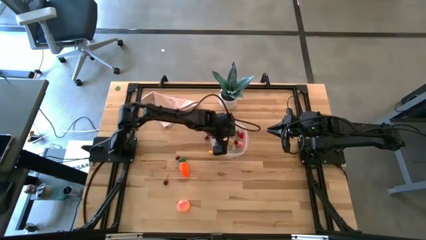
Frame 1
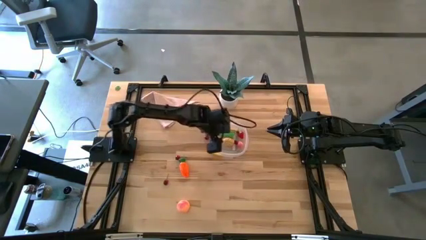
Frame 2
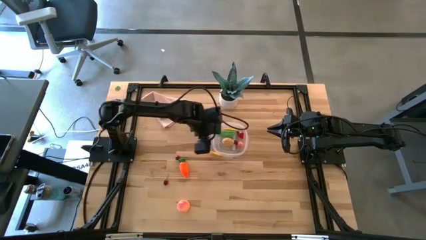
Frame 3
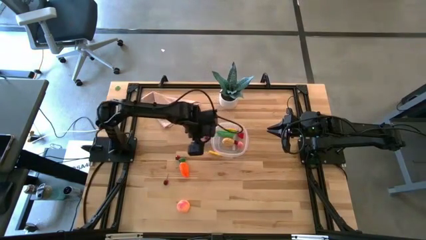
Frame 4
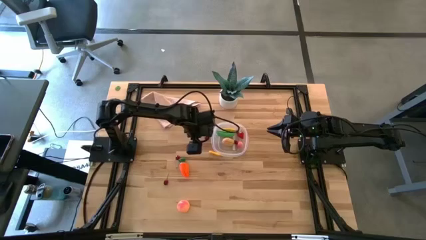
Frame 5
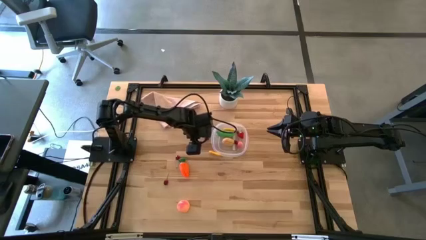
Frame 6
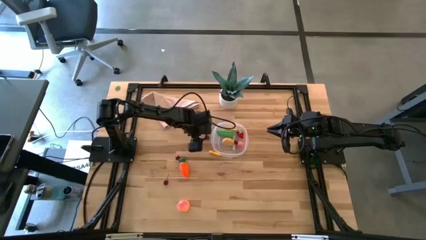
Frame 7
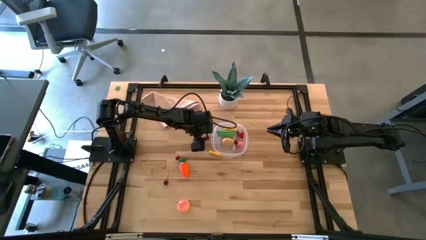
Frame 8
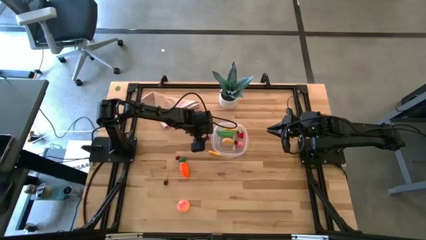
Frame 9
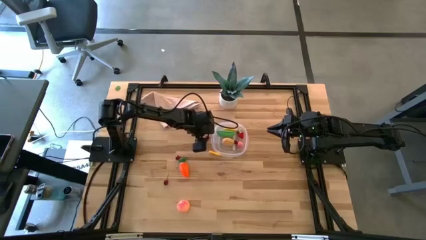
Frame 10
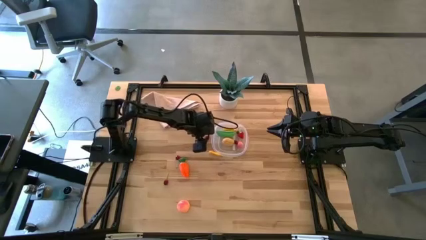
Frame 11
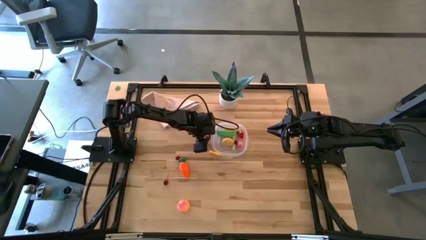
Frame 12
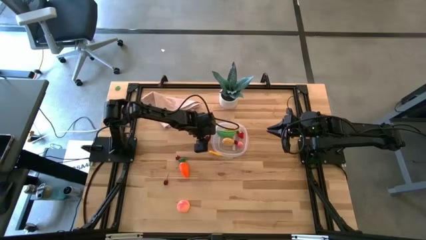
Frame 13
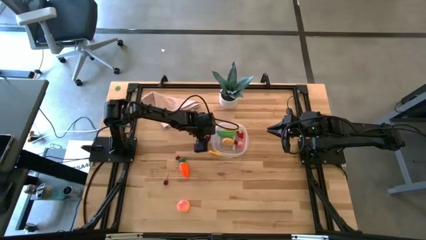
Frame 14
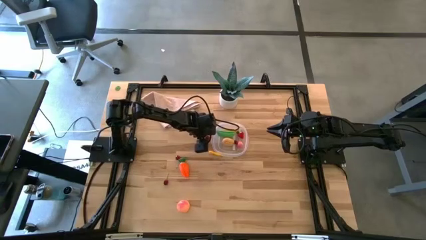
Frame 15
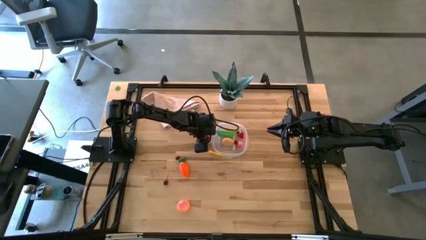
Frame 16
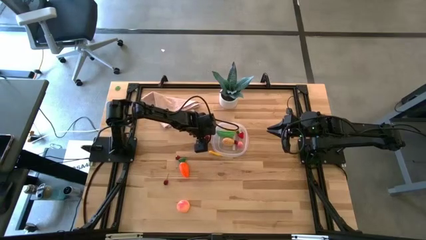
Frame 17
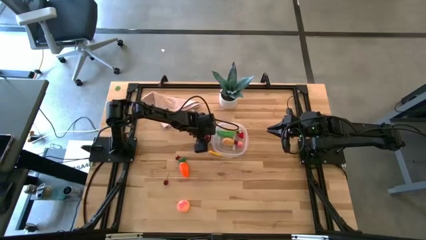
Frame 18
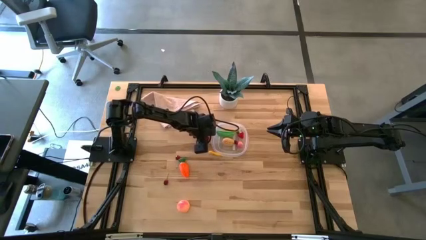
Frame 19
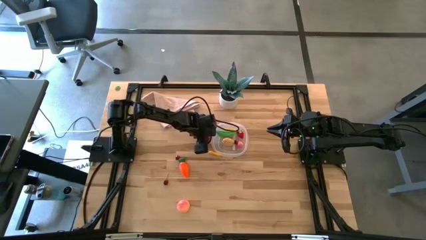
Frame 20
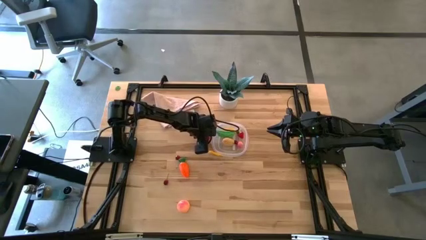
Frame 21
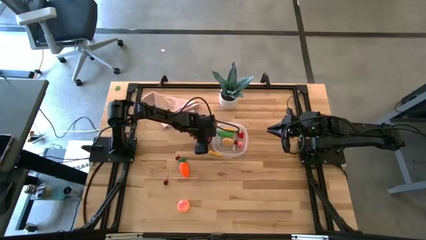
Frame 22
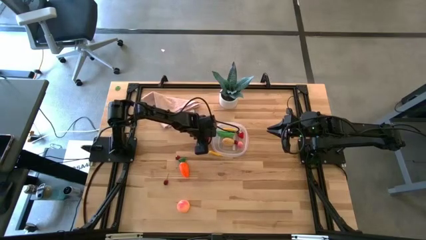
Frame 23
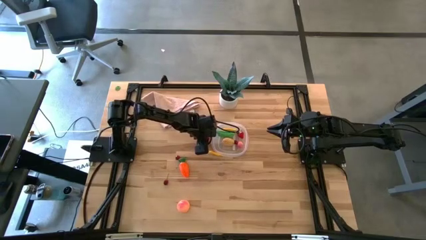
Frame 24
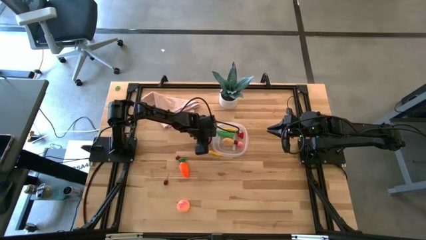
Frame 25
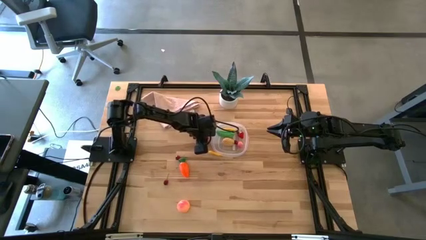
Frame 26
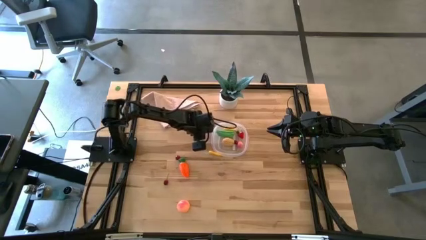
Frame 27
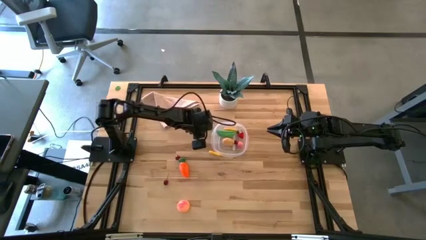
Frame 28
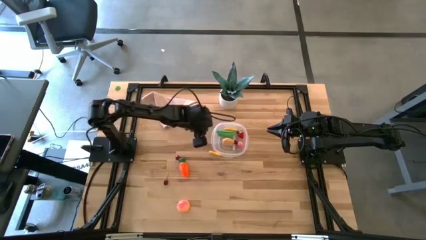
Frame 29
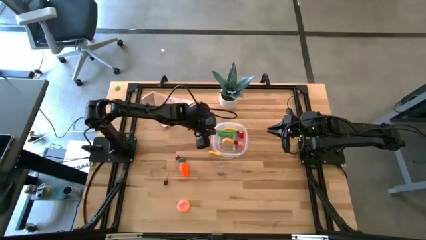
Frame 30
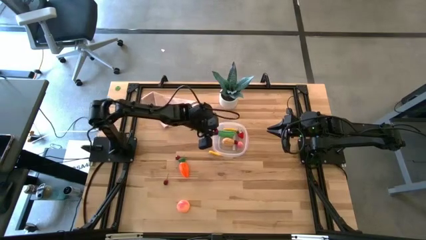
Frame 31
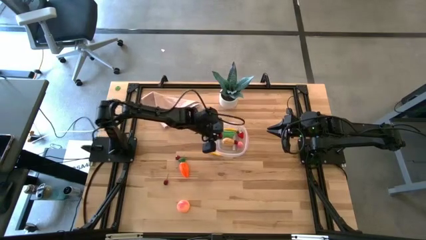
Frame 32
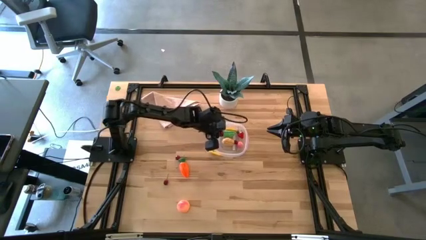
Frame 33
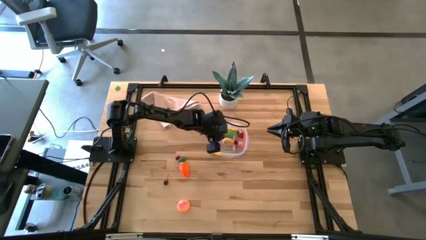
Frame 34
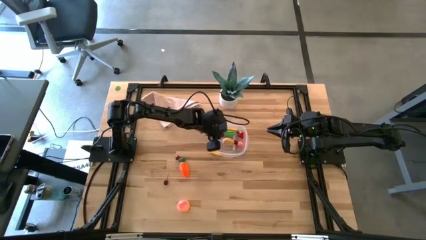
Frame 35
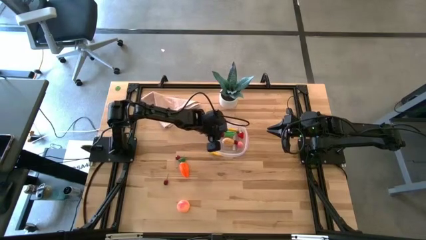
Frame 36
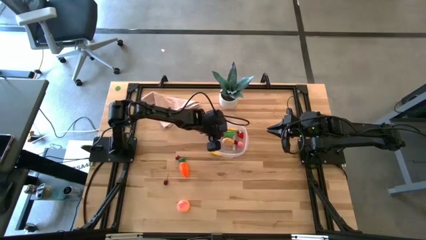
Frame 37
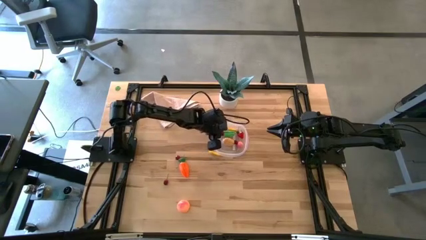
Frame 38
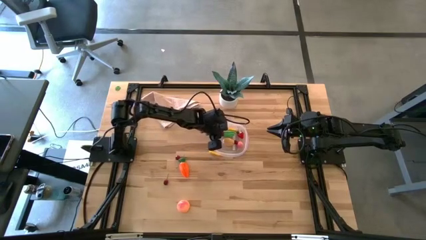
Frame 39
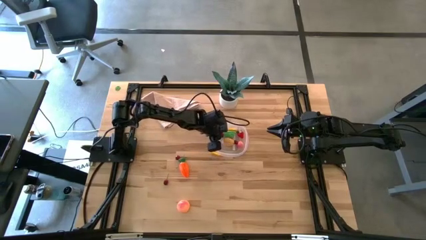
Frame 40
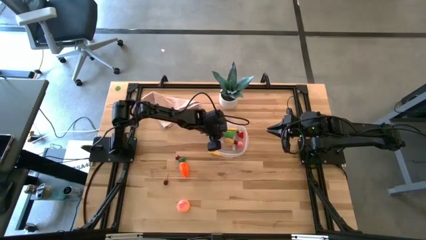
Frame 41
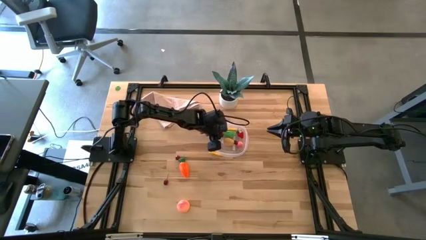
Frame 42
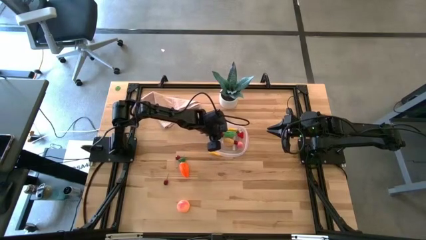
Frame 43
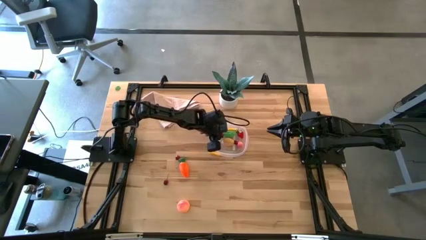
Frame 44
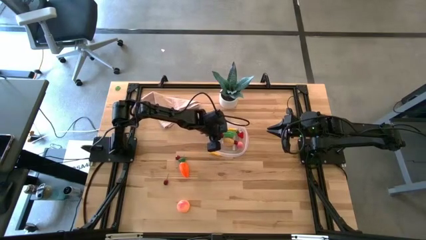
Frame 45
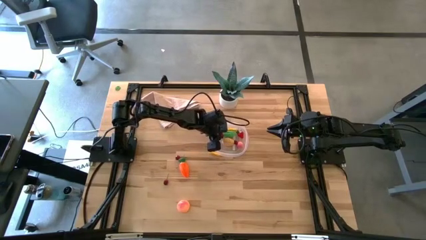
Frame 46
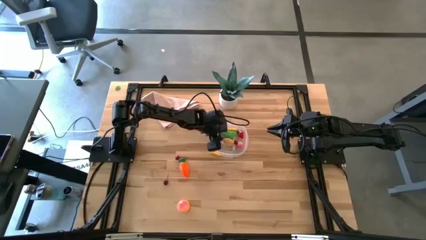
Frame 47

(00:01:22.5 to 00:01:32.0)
Task: Pick and placing Produce into tupperware
Put the top cherry into the transparent bin

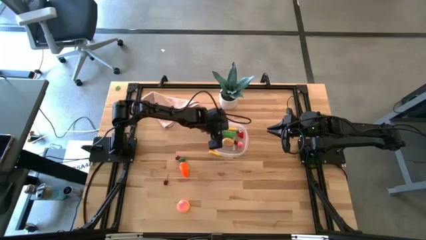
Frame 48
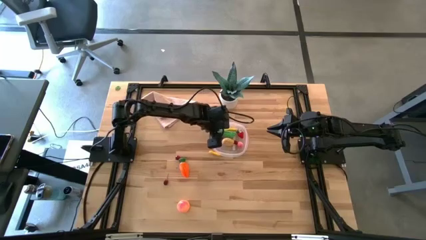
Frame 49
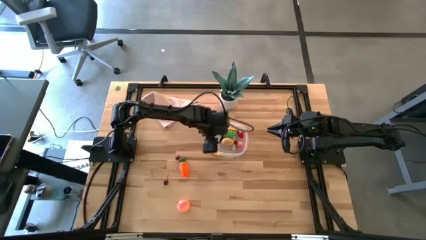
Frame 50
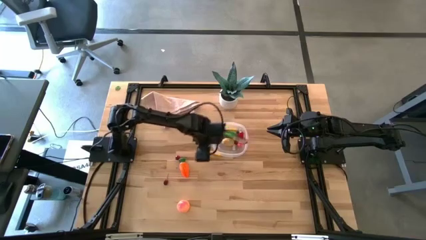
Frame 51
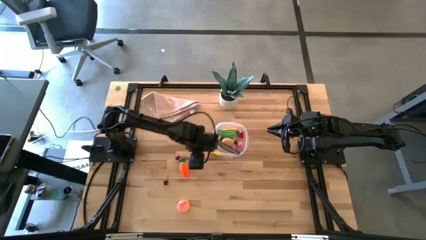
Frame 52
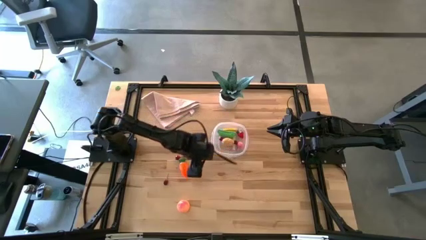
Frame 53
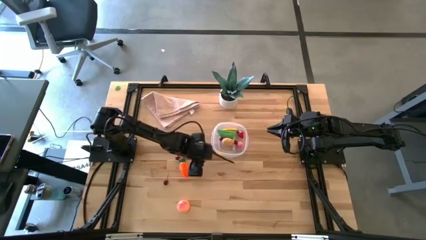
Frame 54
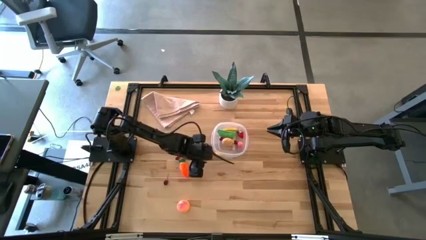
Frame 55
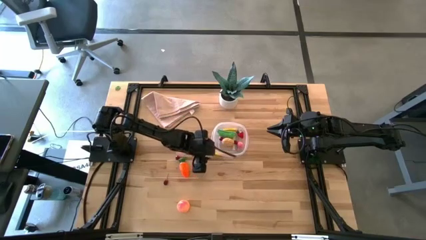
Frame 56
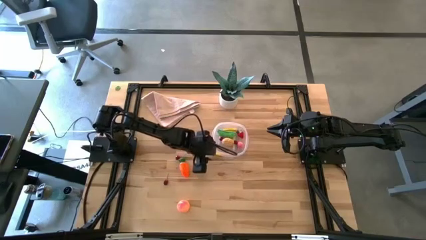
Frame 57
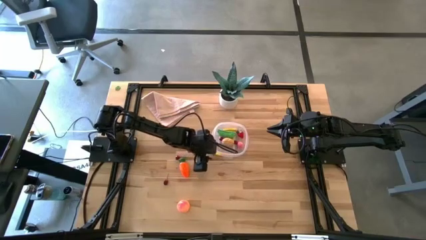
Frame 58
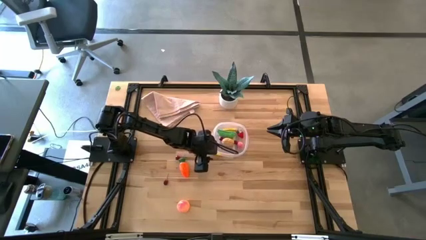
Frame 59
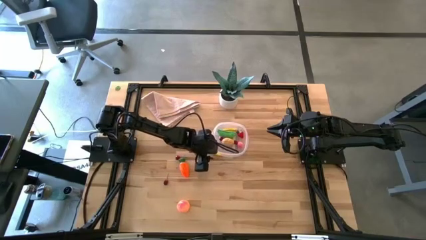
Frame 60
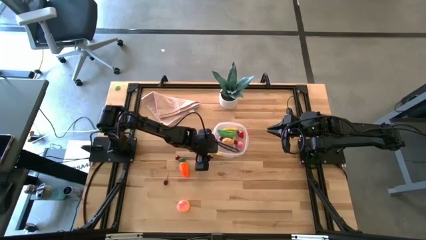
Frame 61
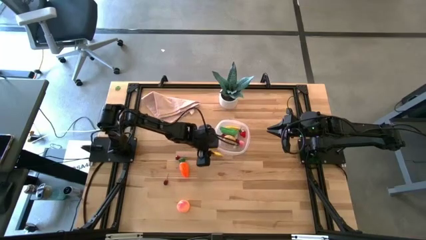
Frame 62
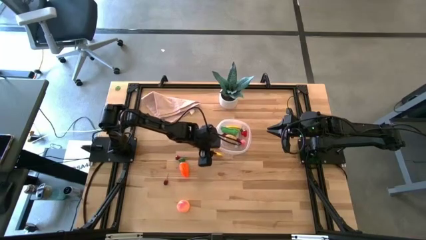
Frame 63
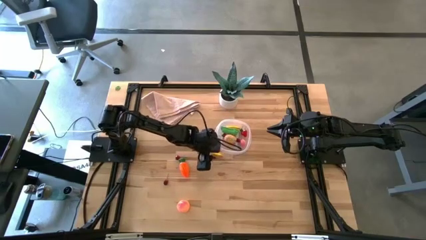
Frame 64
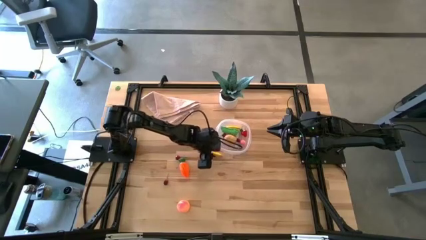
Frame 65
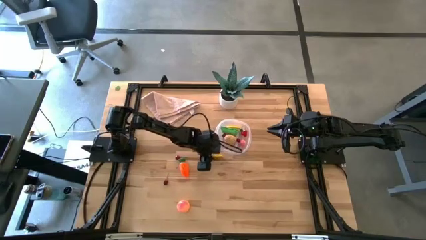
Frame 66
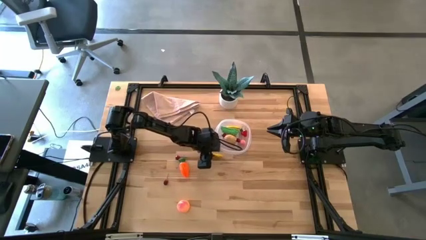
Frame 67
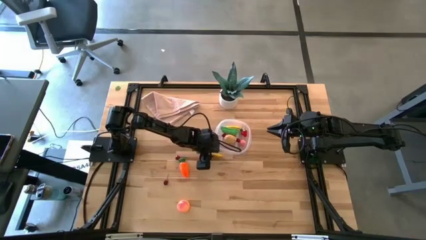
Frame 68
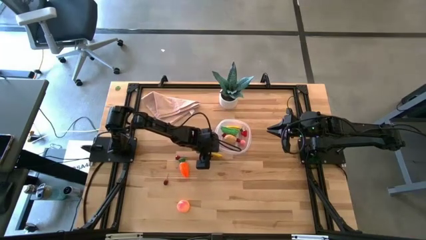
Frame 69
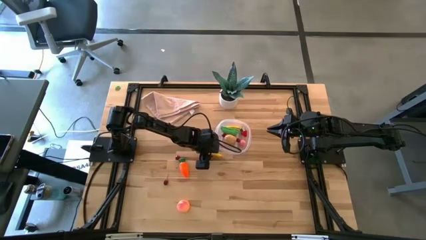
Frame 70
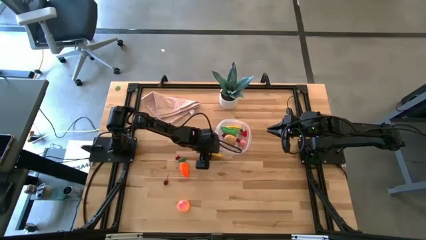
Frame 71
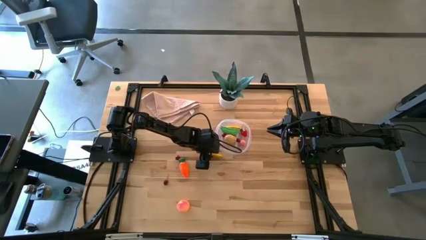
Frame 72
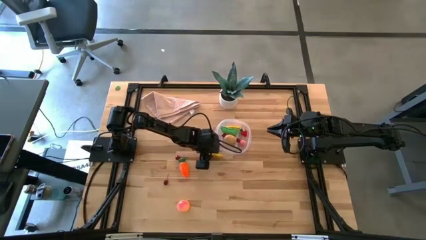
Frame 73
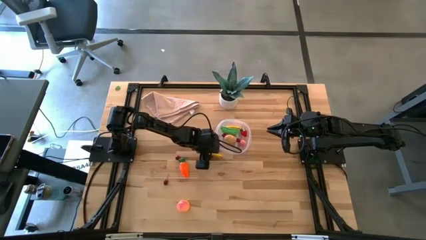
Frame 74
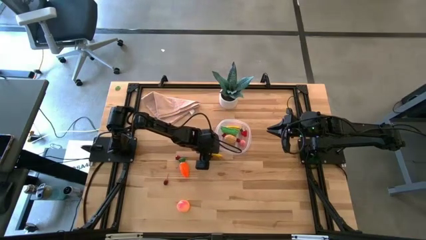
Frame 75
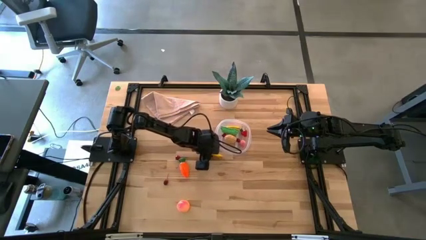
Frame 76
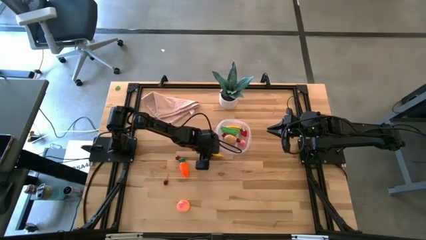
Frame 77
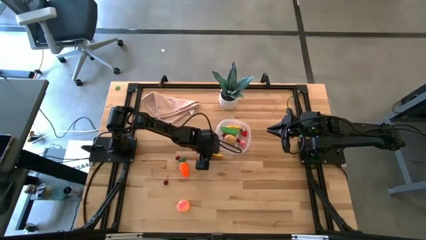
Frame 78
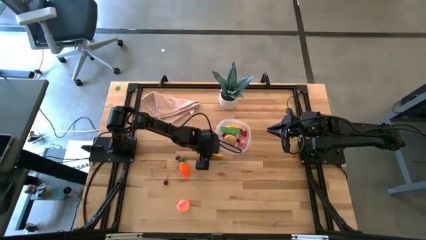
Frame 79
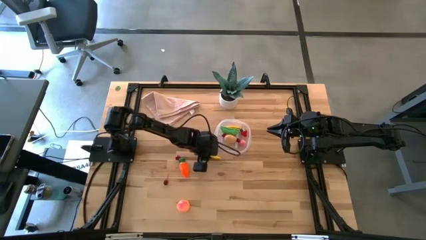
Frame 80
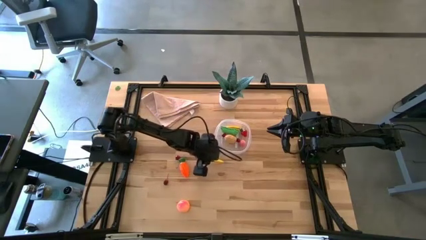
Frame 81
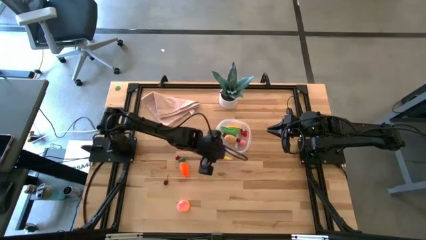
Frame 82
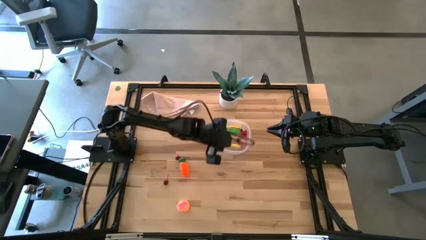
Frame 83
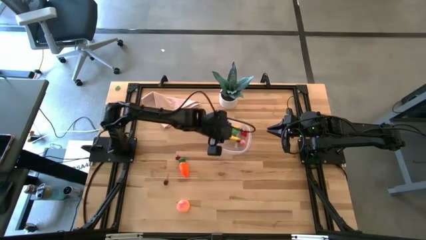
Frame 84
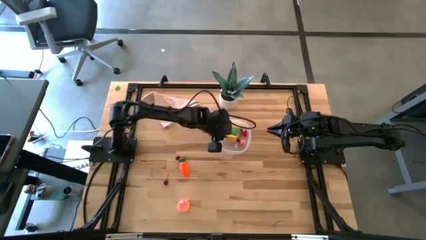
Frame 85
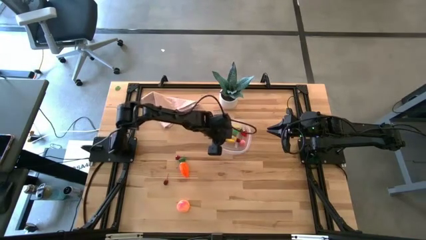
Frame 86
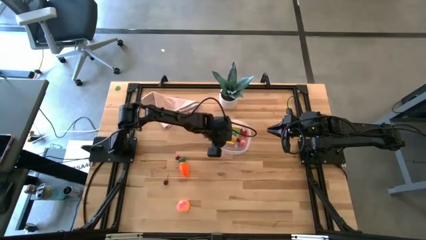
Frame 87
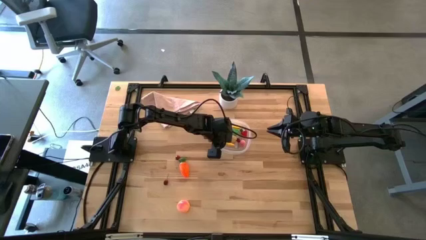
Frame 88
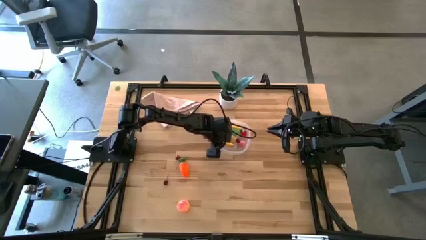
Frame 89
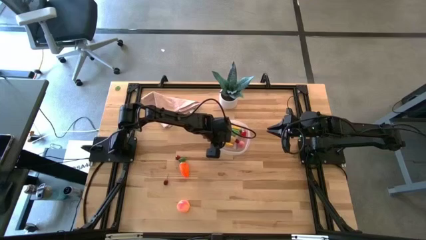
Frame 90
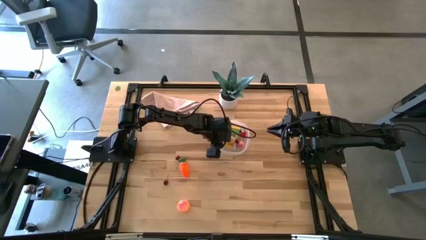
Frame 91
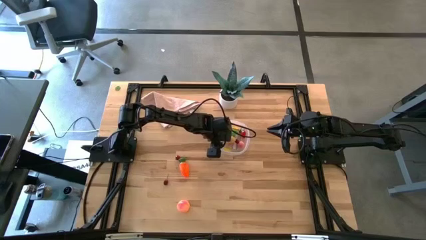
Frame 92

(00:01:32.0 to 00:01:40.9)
Put the corn into the transparent bin
